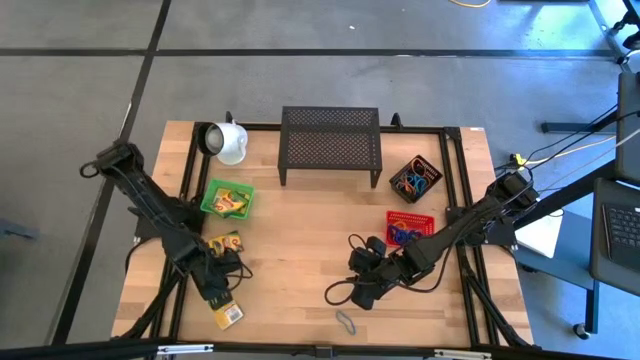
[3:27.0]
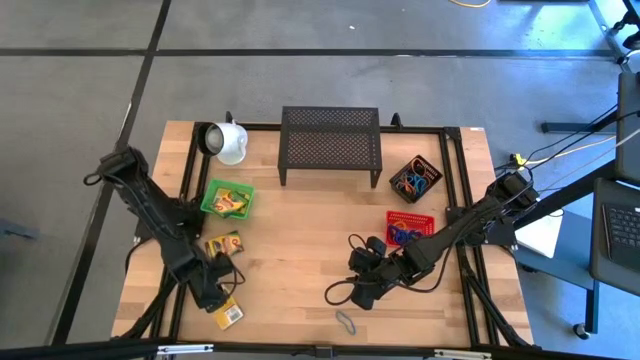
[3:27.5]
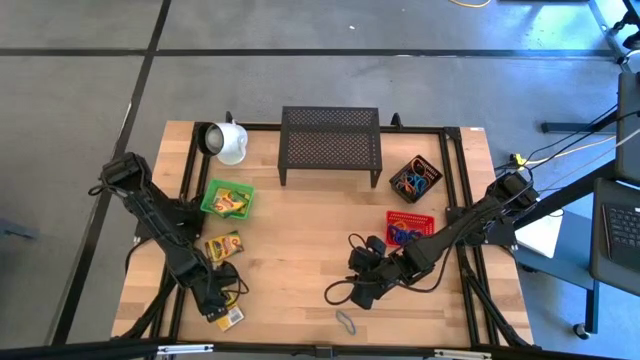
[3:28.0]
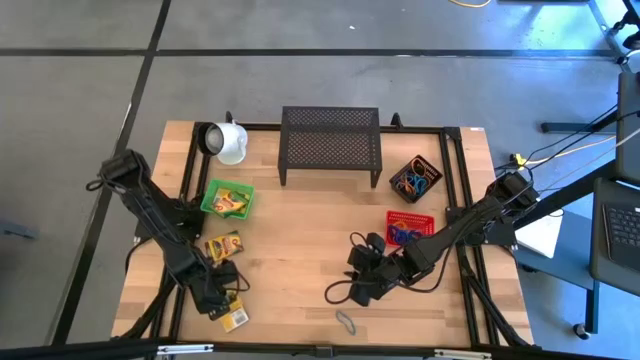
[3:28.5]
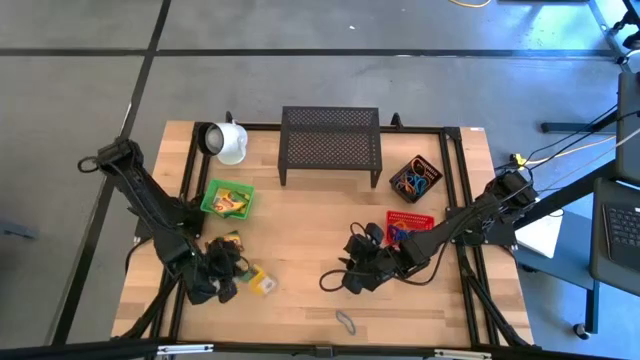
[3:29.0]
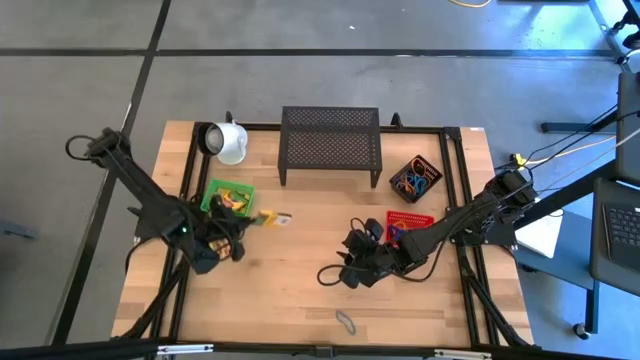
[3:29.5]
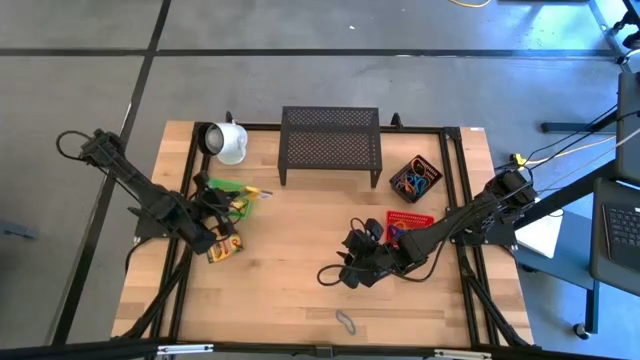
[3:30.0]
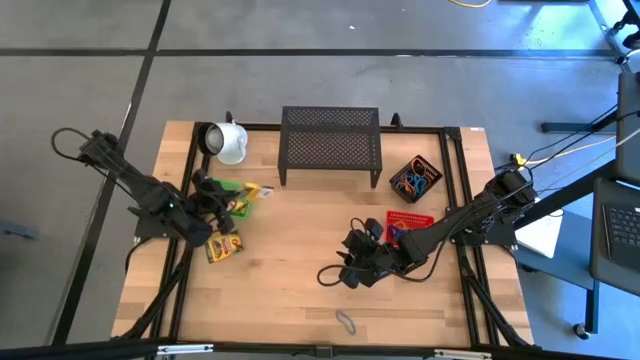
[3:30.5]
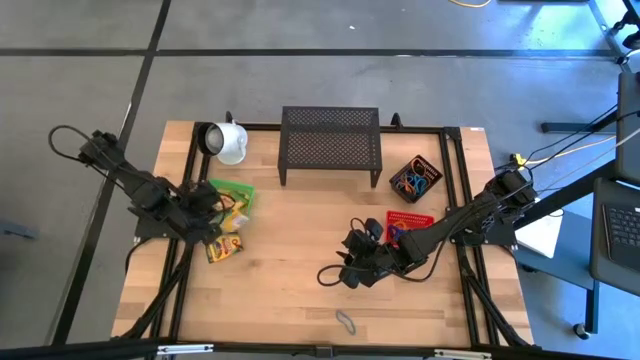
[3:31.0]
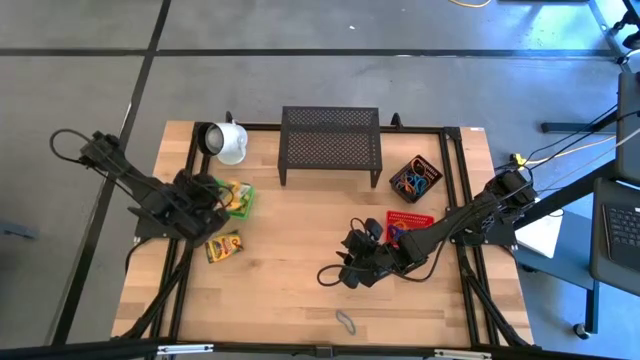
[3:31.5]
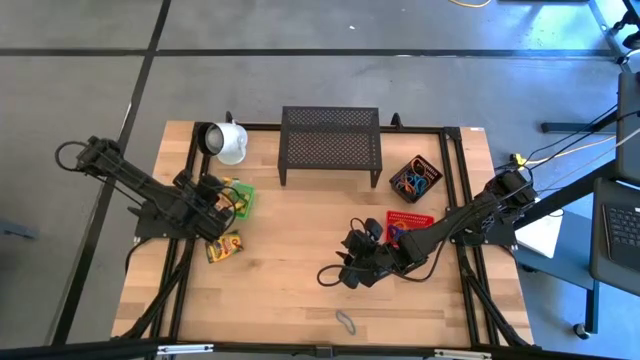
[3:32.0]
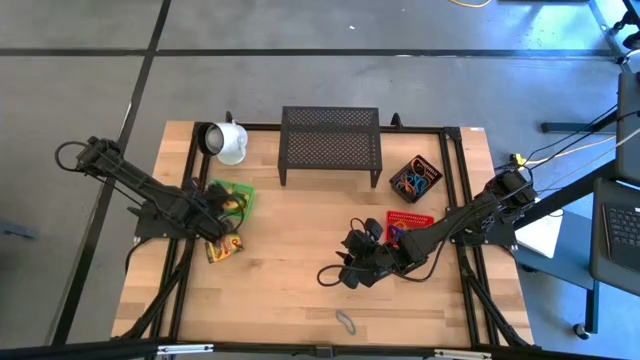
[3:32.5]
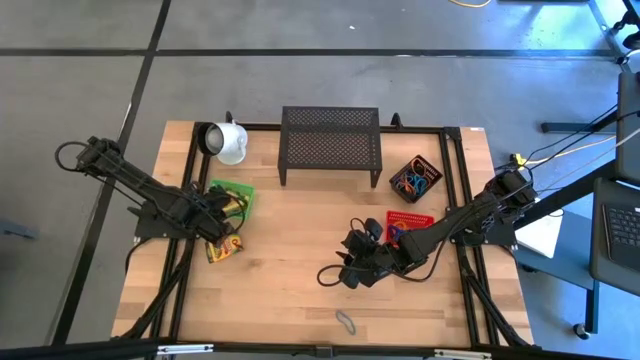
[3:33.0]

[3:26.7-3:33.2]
Task: Pick & Place Office Desk Supplies
Put the pack of crayons into the green bin

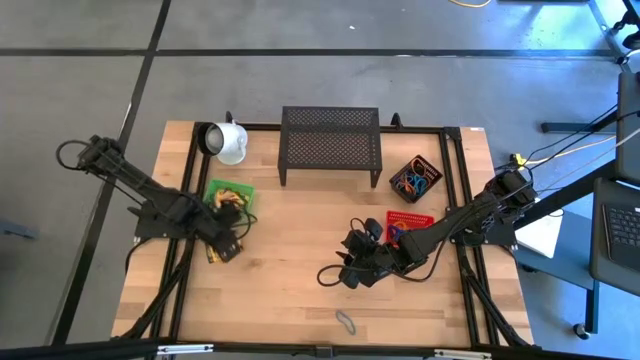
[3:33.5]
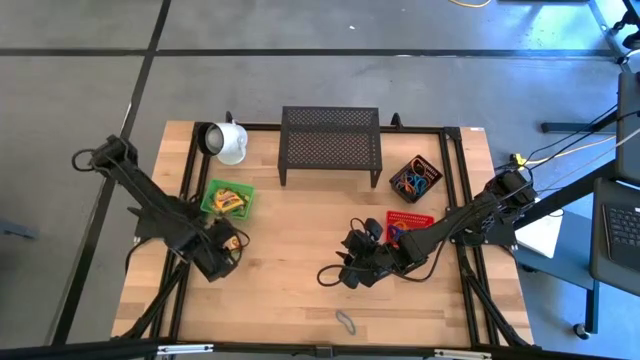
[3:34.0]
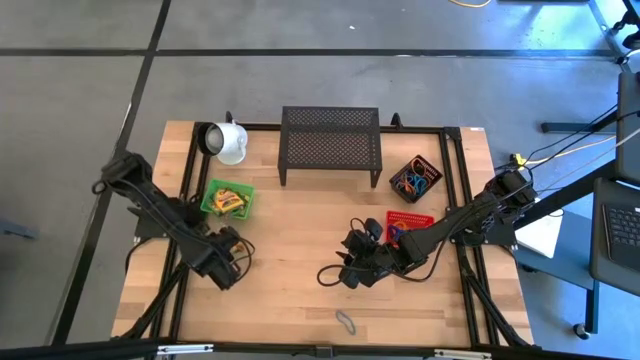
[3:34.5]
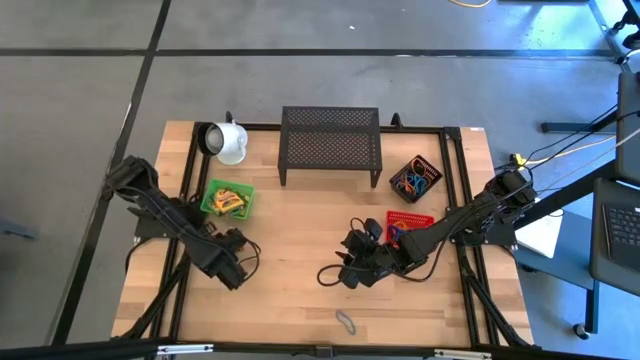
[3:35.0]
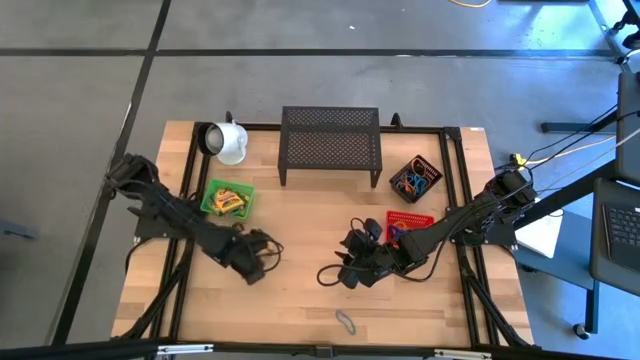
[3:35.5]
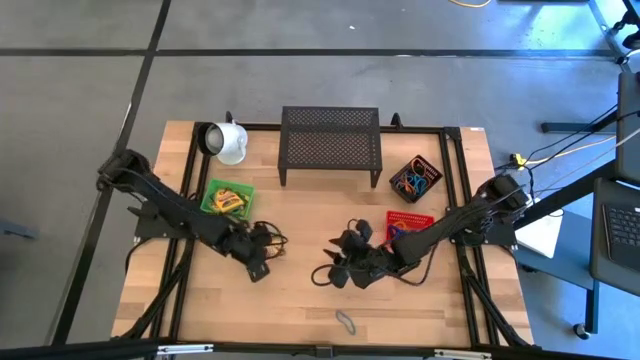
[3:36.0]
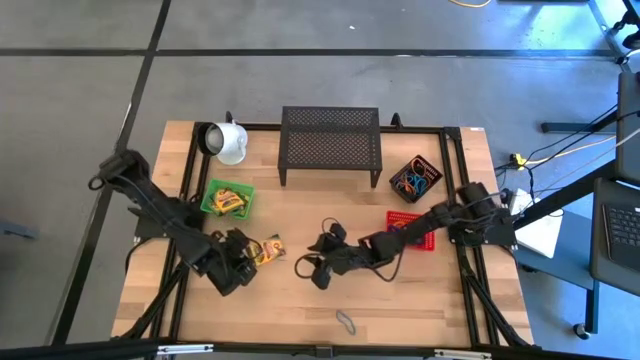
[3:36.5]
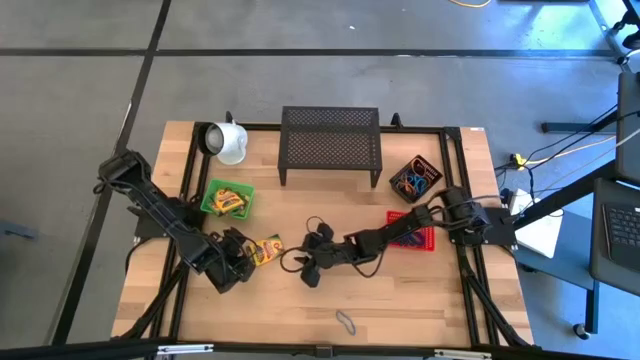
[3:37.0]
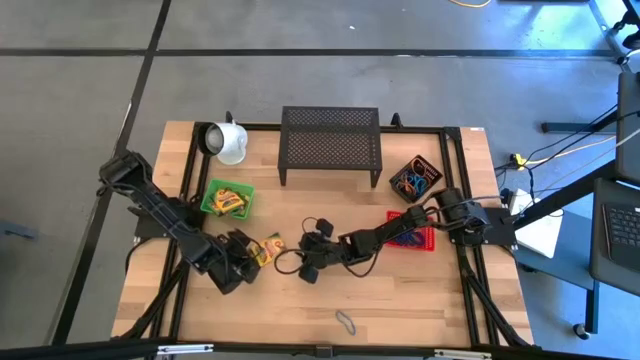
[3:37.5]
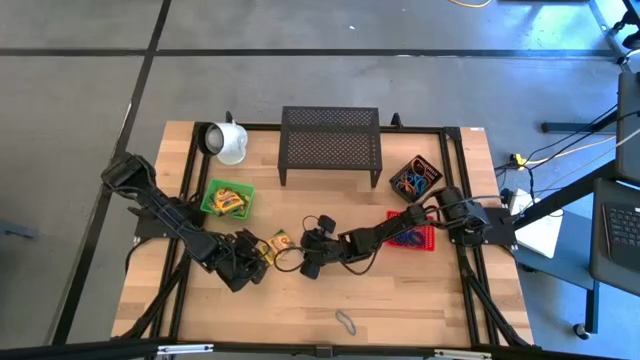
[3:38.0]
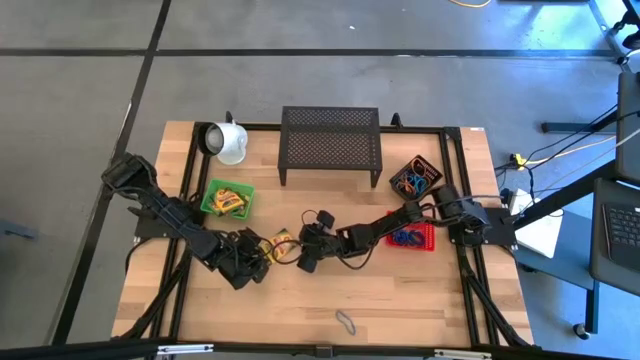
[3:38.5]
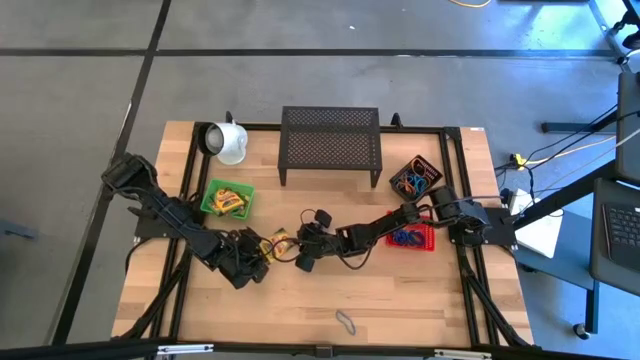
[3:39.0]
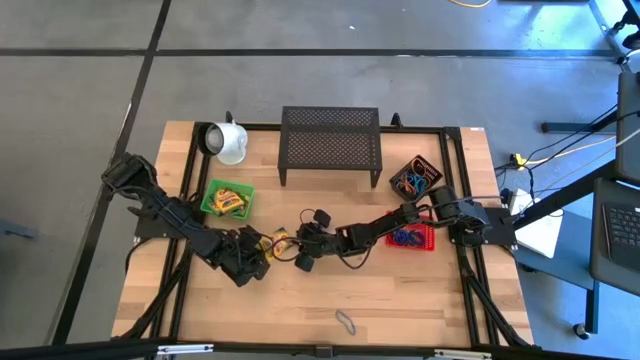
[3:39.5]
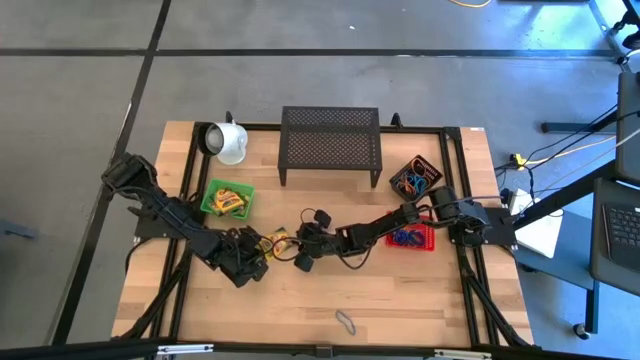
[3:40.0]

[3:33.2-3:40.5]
Put the pack of crayons into the green bin

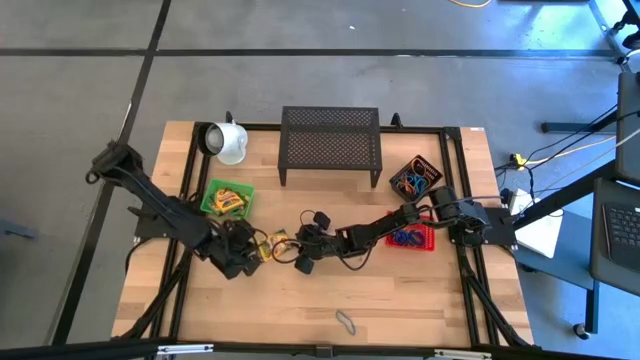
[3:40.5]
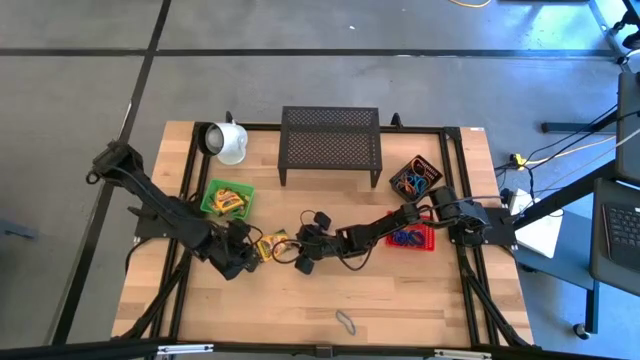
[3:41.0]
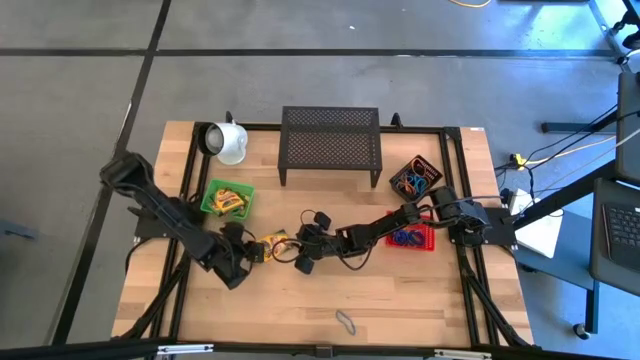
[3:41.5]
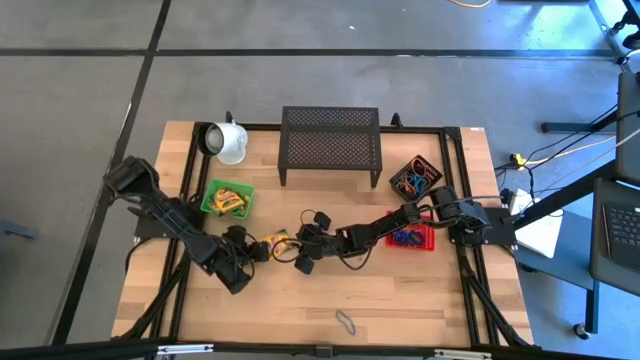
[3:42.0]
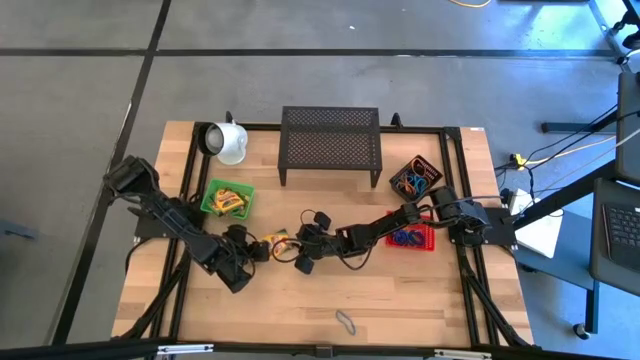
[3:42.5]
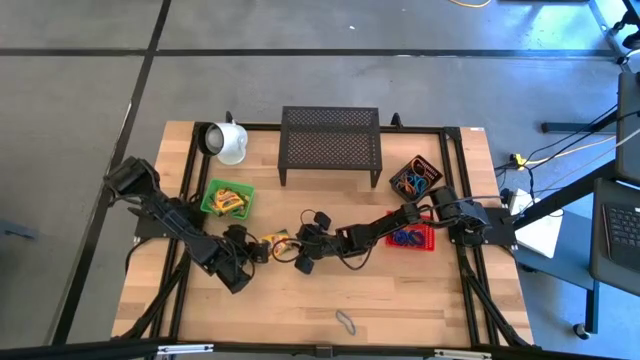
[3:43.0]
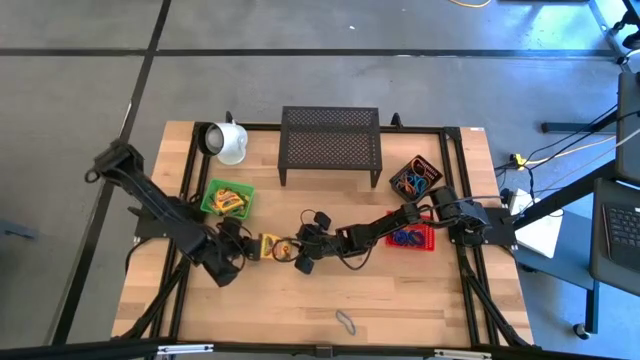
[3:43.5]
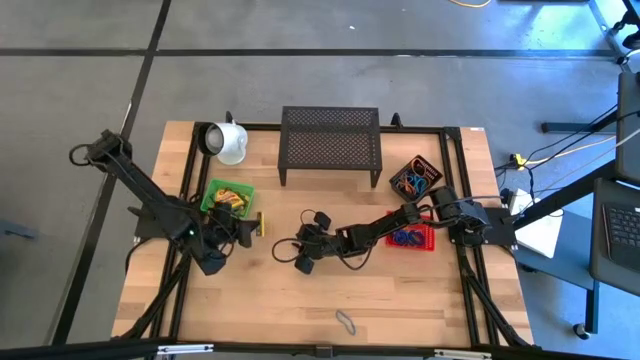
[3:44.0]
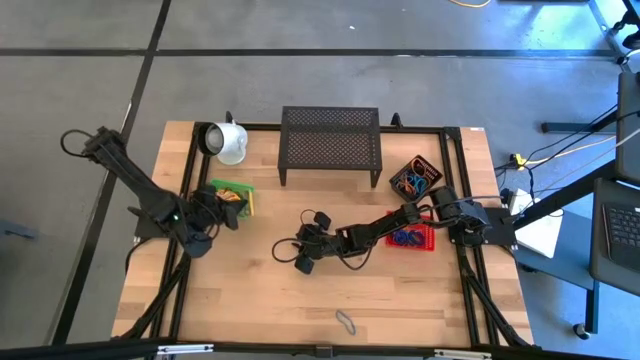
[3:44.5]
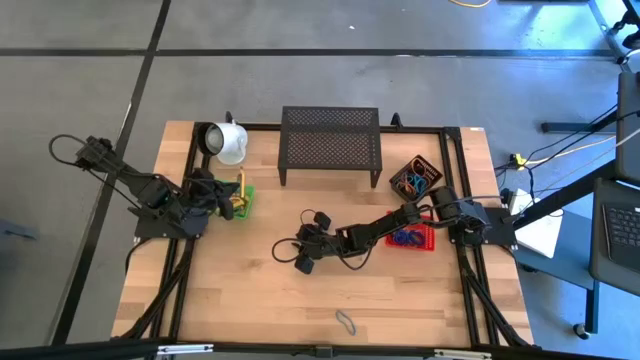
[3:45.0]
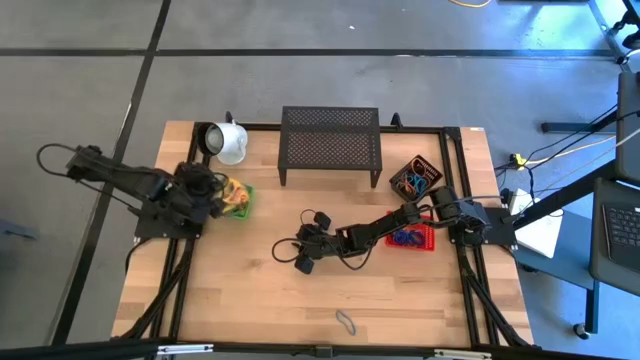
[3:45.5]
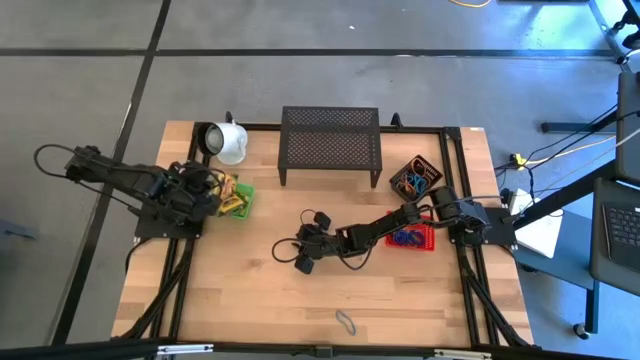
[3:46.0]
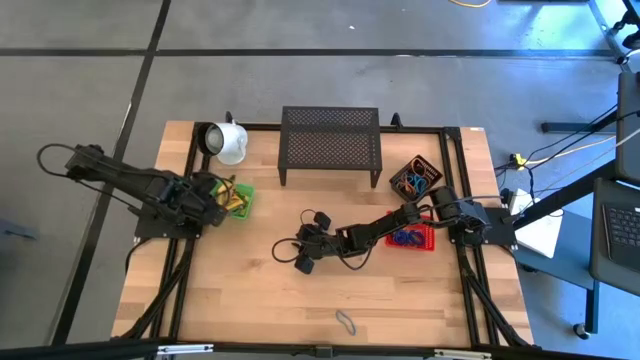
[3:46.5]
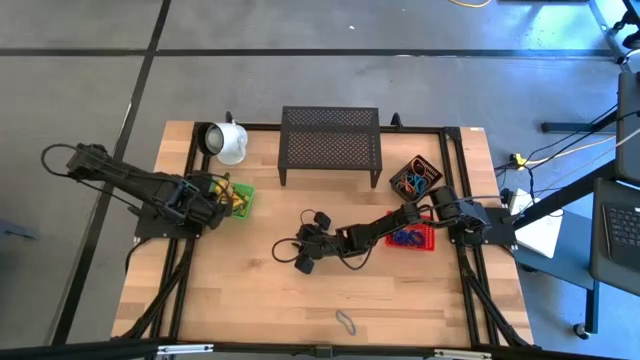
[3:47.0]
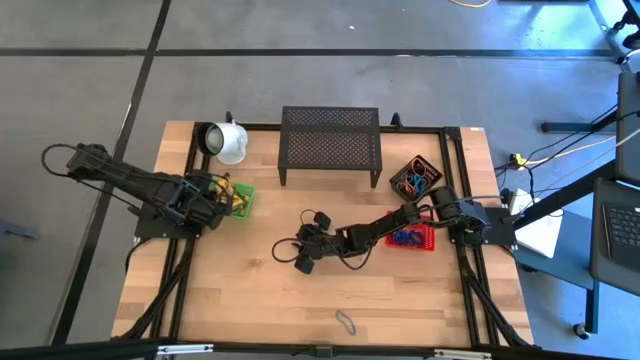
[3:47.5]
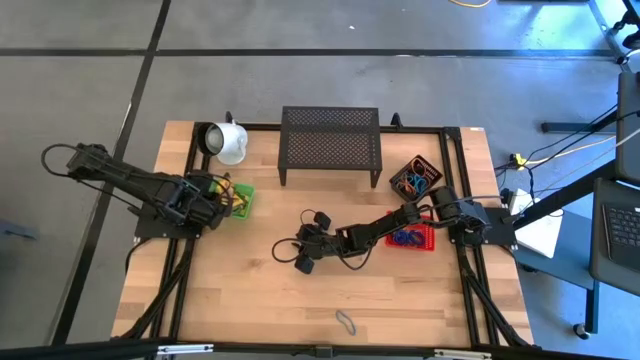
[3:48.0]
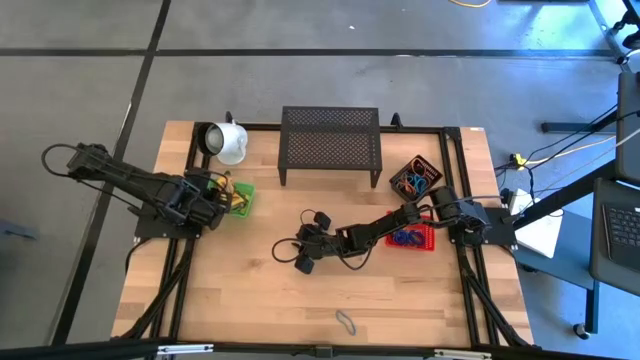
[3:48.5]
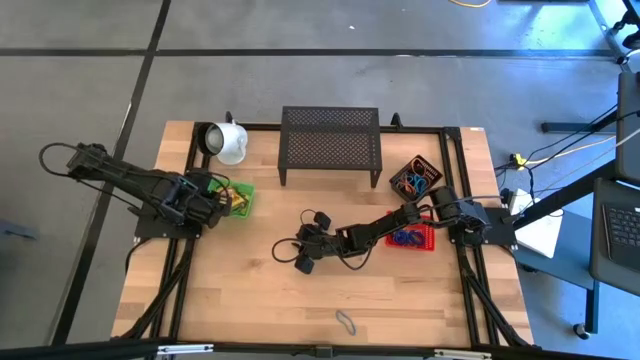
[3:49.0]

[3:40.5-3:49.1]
Put the pack of crayons into the green bin
